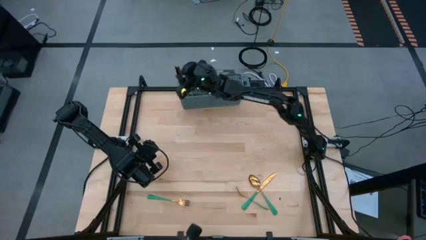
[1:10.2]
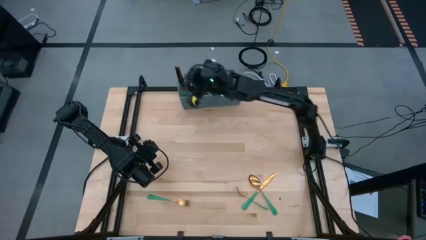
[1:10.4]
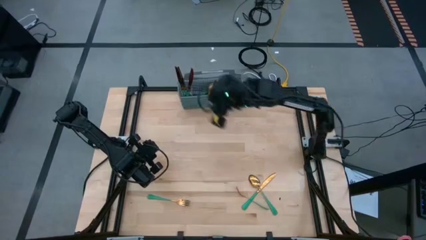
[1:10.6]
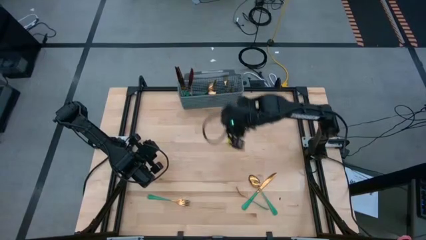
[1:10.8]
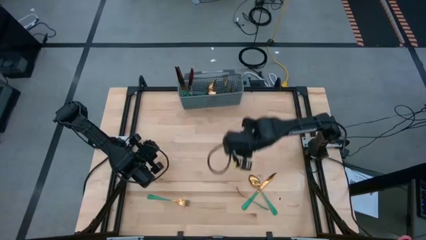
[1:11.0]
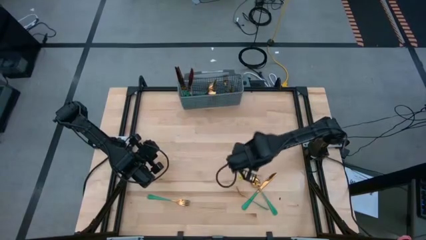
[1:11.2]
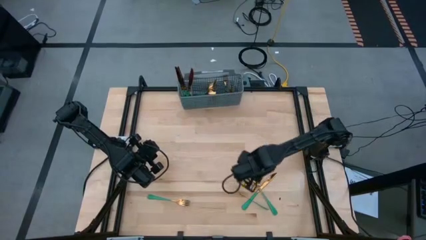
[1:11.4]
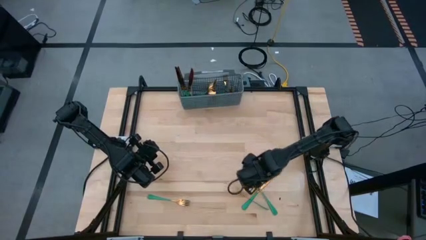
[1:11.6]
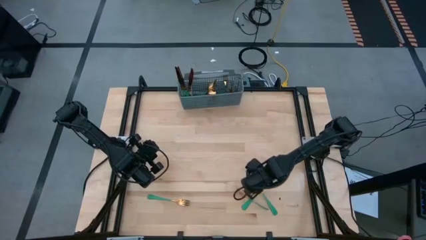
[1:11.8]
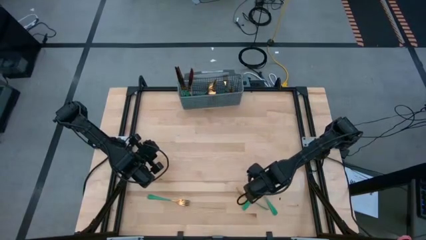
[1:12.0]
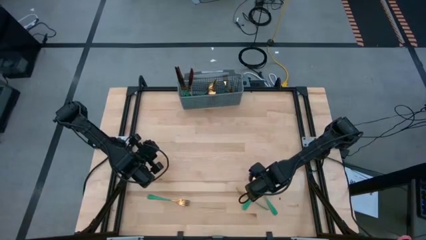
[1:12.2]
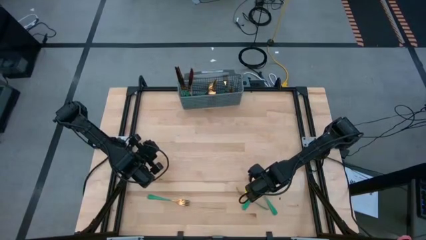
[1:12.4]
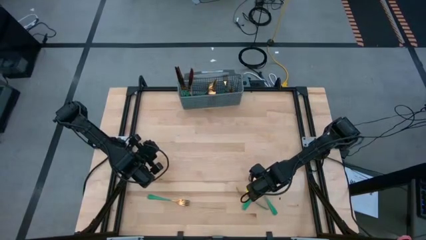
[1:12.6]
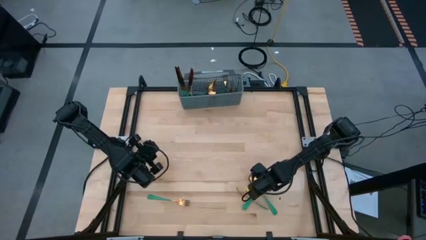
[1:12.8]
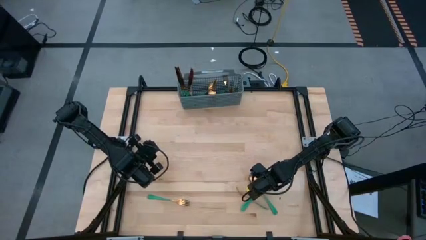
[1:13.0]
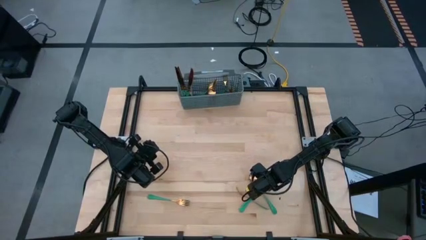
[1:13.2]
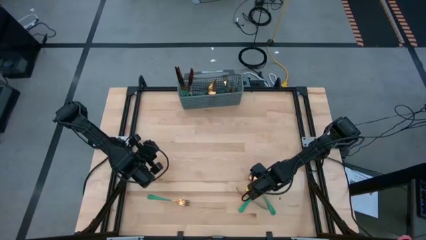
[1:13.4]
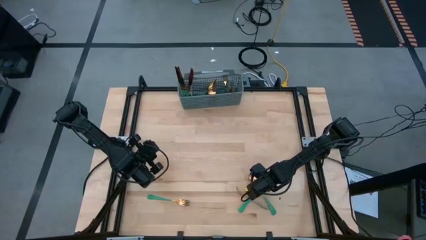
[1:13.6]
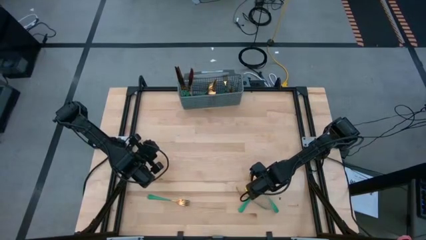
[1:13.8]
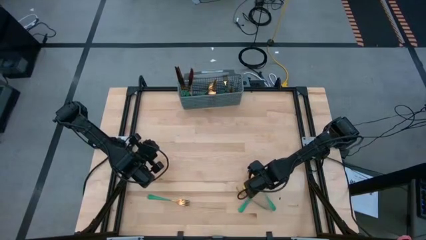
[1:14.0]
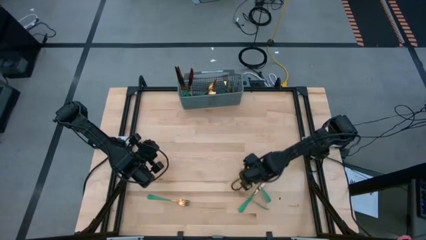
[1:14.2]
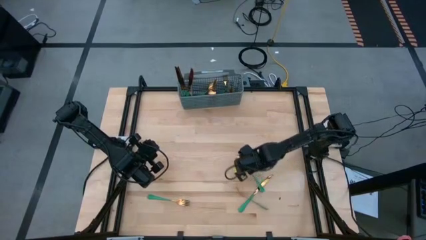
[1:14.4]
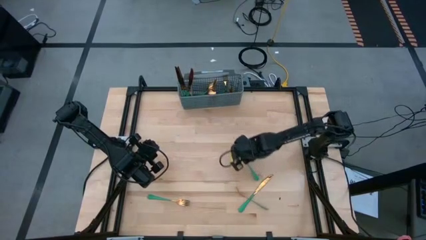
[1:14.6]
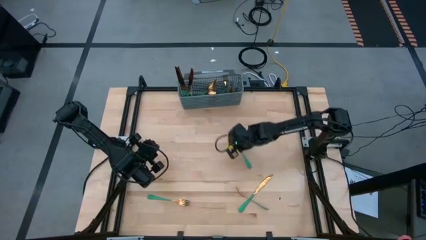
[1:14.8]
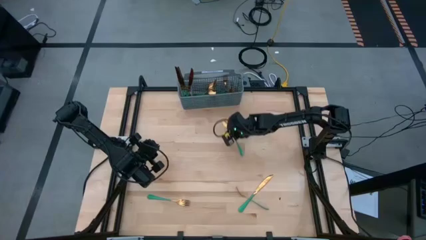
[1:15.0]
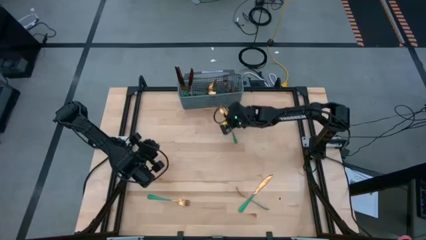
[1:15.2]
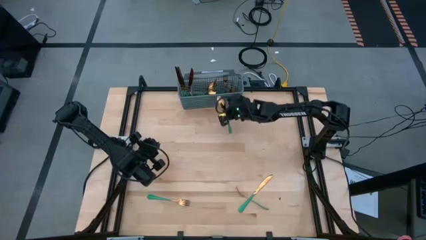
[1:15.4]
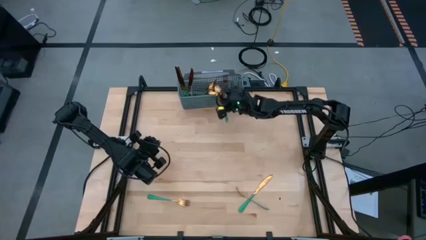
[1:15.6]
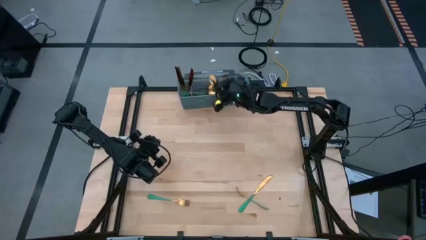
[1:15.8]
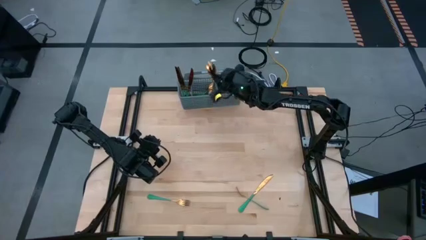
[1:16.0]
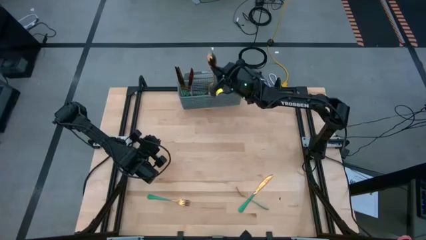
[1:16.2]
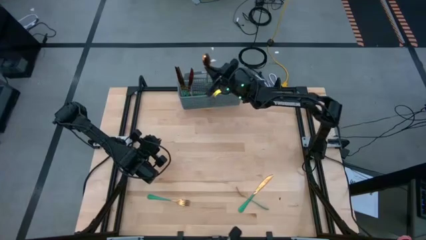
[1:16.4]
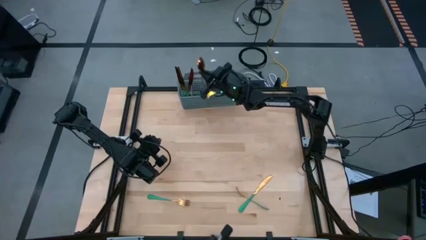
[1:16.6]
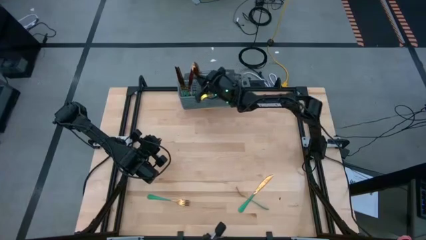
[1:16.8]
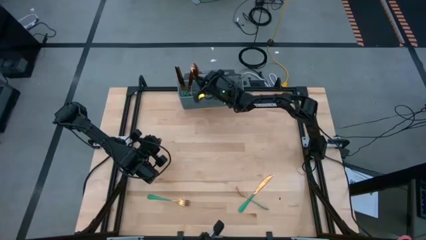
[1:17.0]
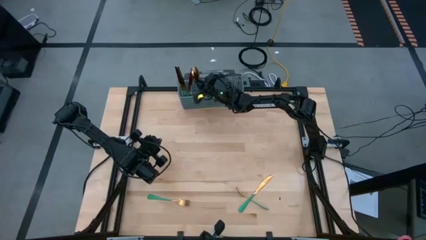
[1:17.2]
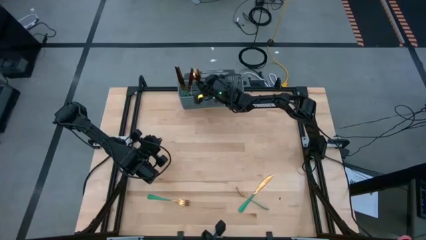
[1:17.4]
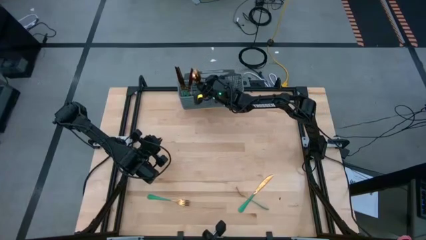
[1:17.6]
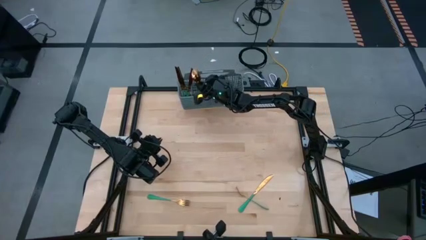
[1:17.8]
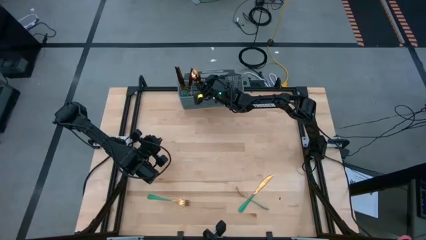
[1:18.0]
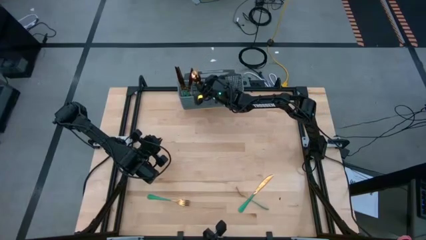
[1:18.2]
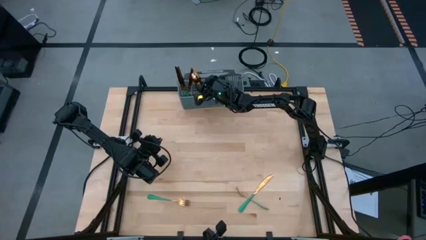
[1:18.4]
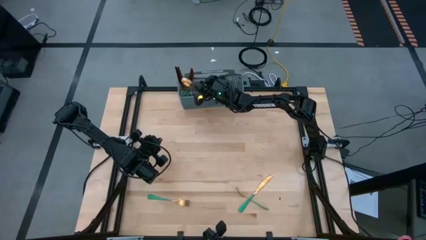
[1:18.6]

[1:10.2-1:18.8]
Task: Sort silverware
Put the green spoon into the gray bin

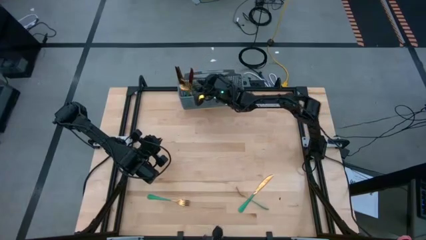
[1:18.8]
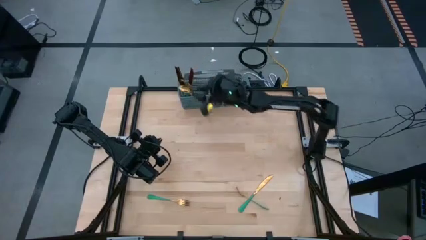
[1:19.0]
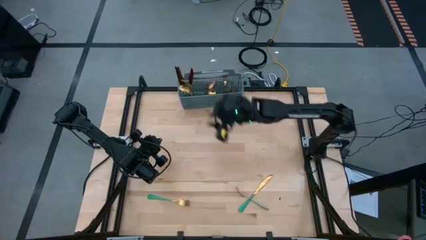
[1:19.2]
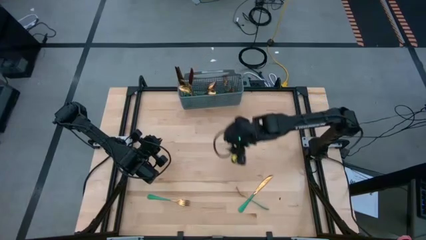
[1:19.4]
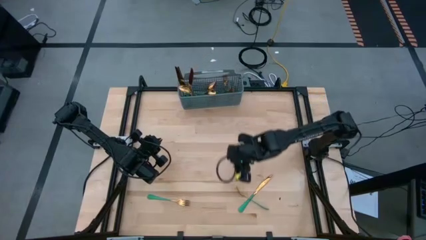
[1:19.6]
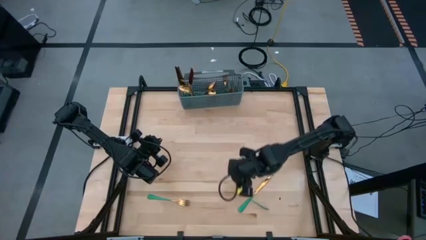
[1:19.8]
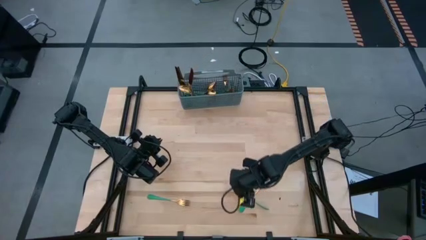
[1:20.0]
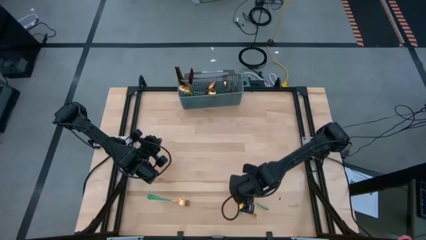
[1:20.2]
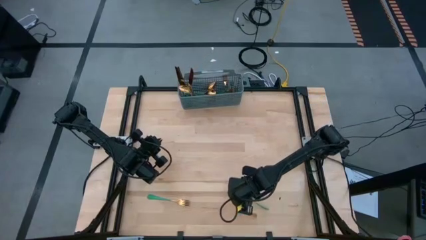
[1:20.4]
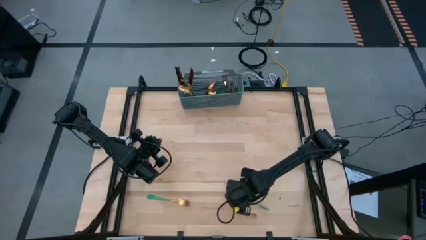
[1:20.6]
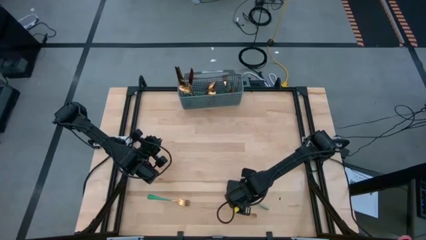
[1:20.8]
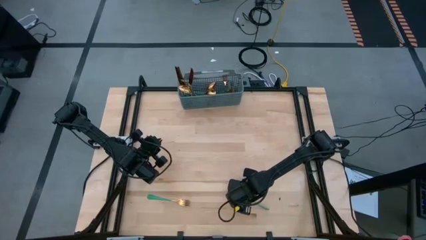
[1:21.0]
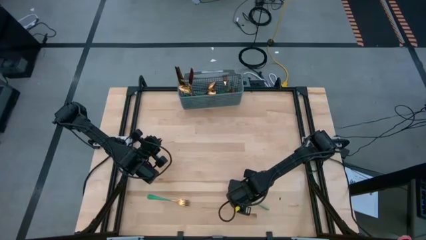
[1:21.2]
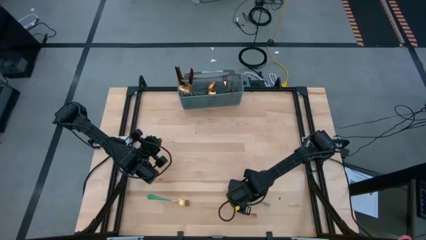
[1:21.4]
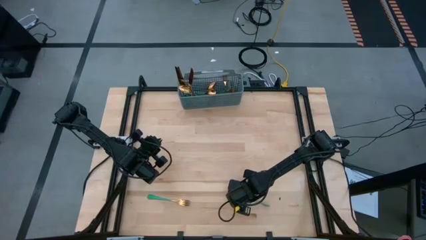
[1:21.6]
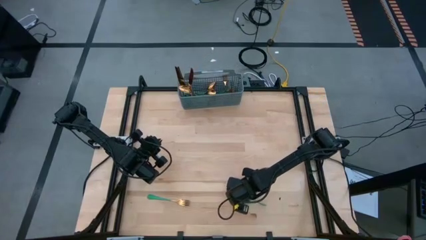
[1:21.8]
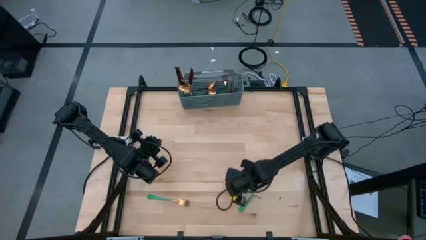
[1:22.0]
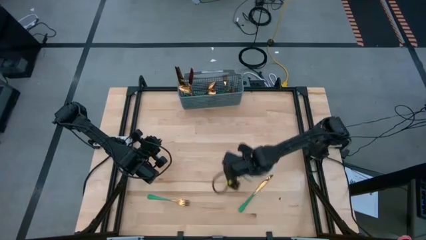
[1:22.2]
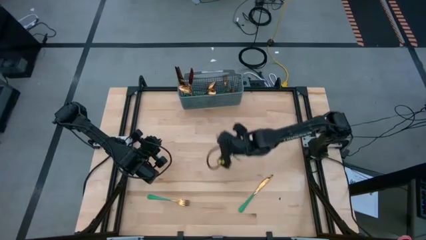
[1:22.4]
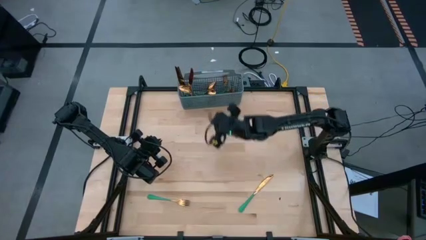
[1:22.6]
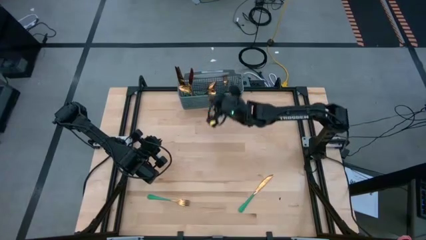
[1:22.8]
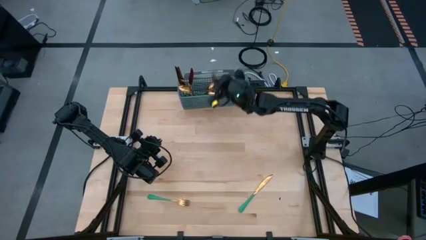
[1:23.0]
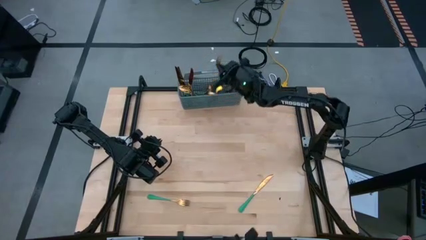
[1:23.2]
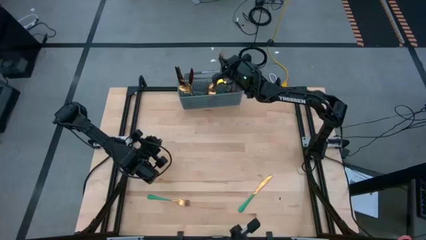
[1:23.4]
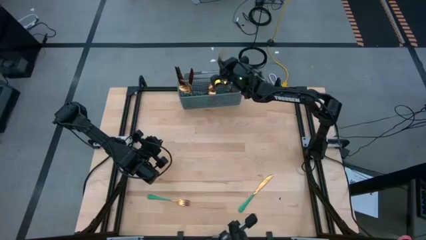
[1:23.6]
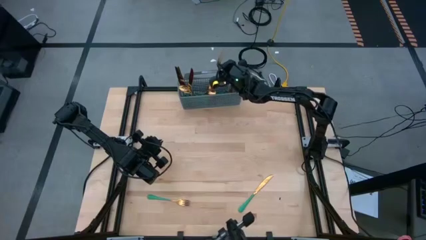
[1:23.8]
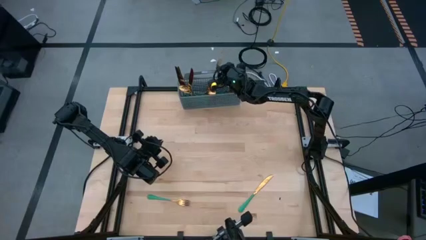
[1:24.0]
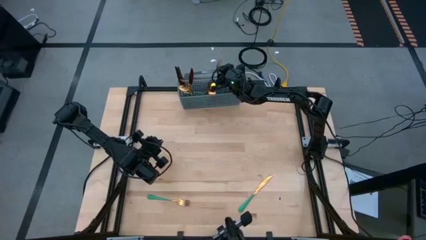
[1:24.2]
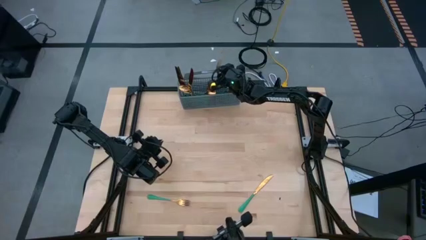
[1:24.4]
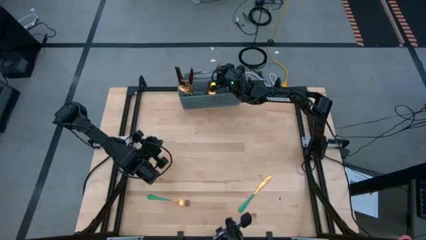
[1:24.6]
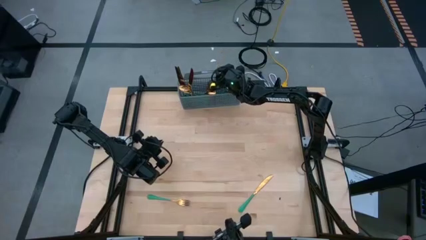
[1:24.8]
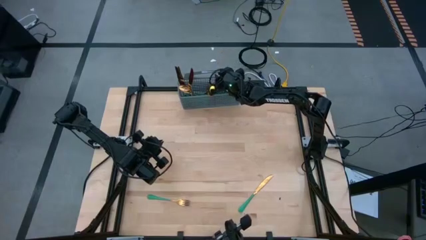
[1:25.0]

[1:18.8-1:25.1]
Put the right green fork into the gray bin
